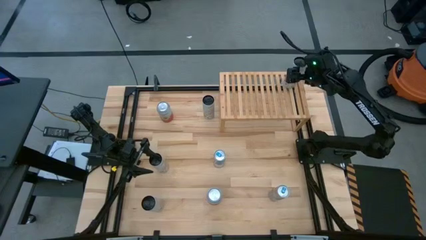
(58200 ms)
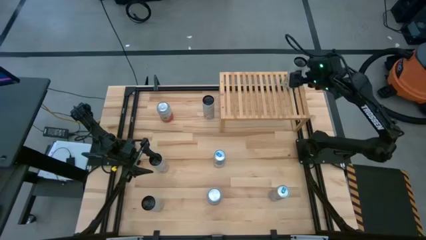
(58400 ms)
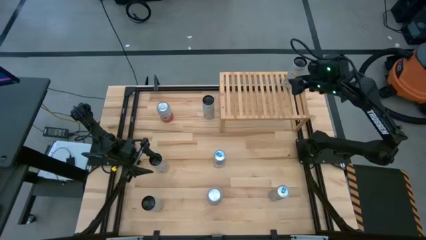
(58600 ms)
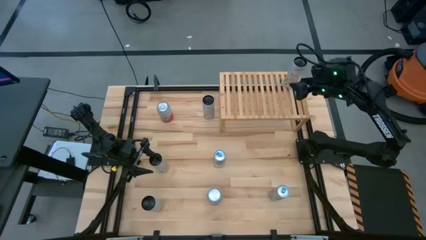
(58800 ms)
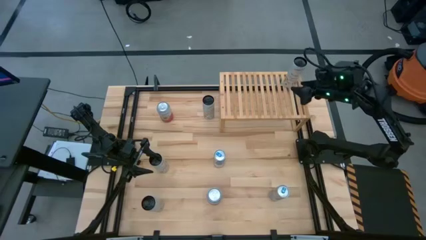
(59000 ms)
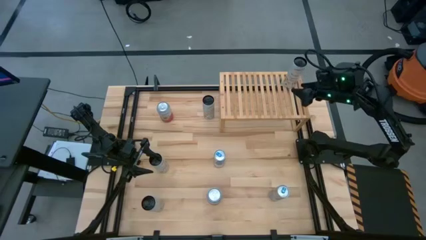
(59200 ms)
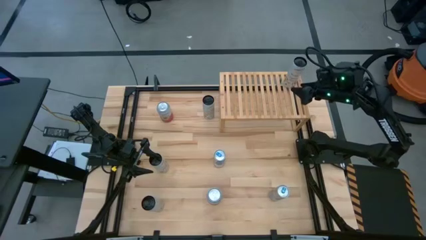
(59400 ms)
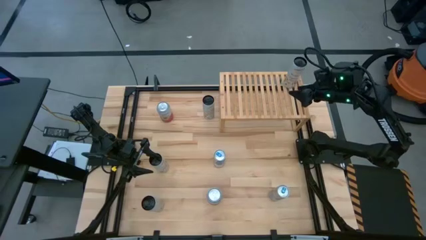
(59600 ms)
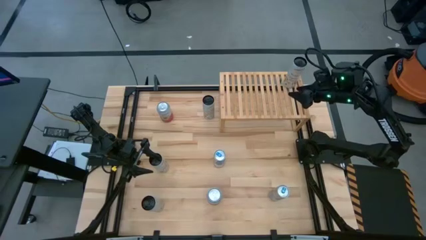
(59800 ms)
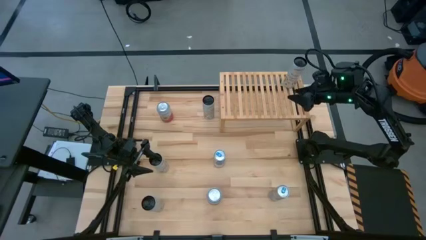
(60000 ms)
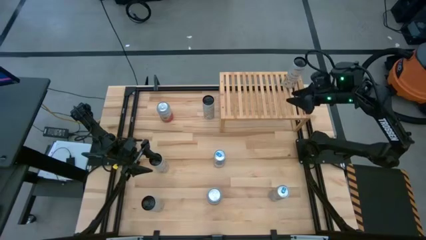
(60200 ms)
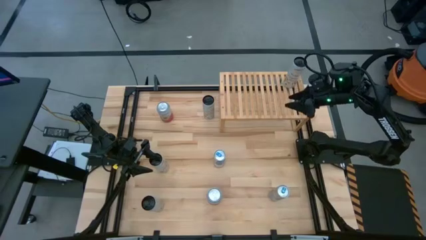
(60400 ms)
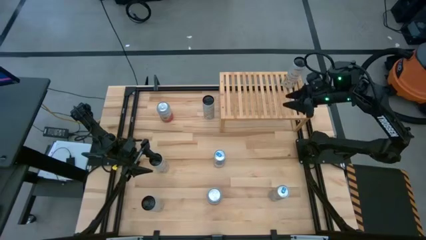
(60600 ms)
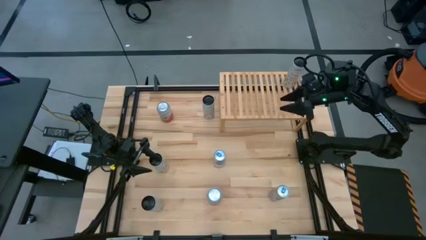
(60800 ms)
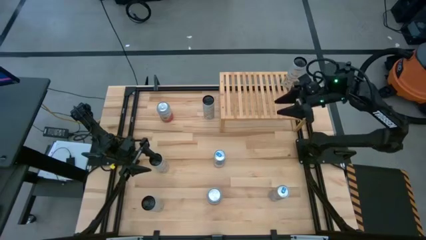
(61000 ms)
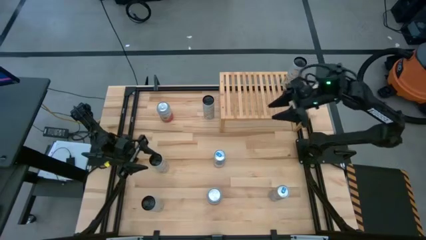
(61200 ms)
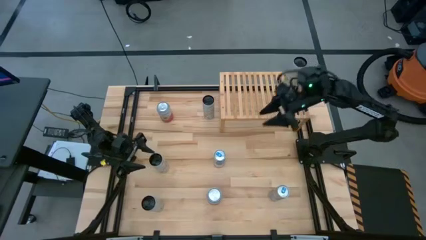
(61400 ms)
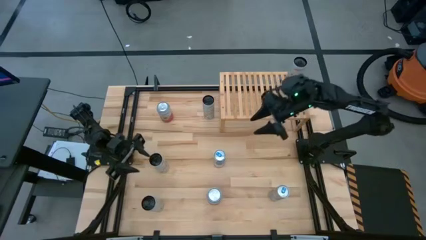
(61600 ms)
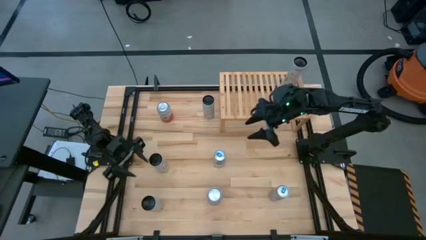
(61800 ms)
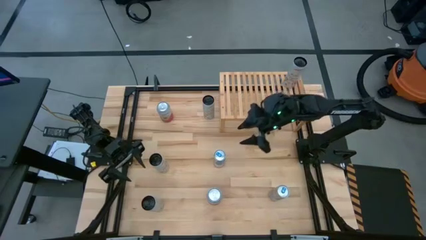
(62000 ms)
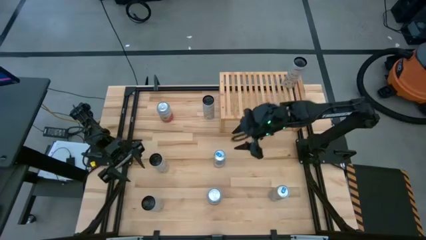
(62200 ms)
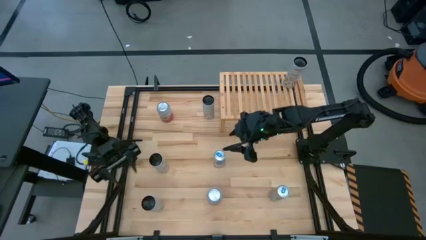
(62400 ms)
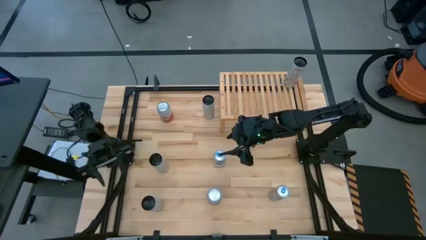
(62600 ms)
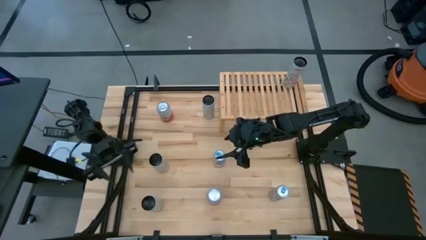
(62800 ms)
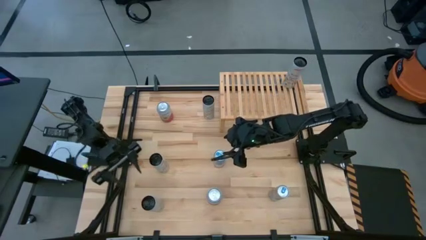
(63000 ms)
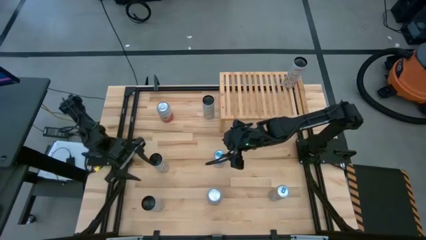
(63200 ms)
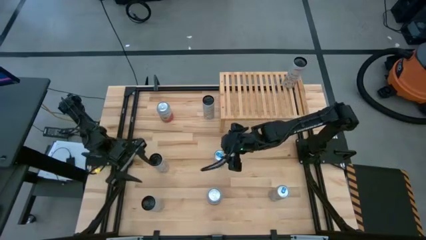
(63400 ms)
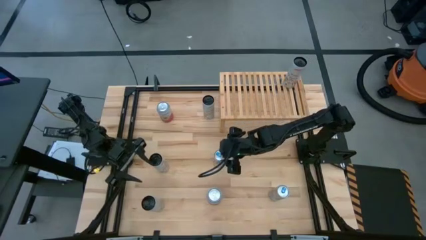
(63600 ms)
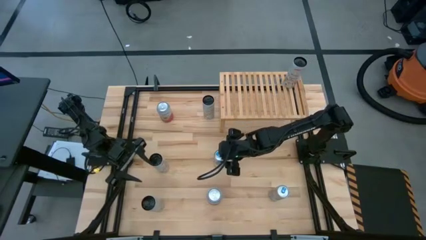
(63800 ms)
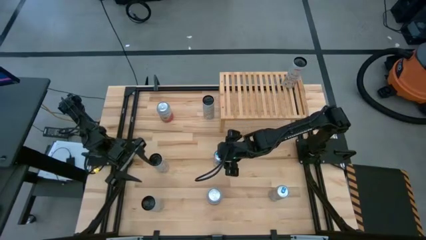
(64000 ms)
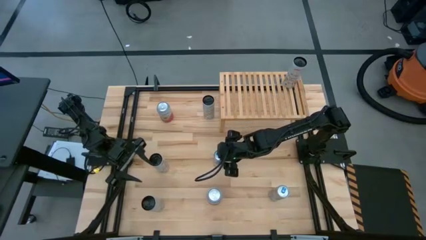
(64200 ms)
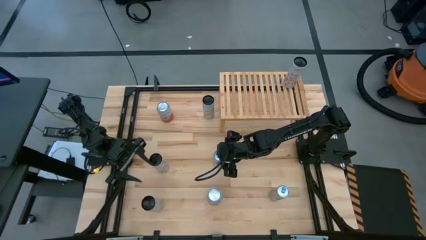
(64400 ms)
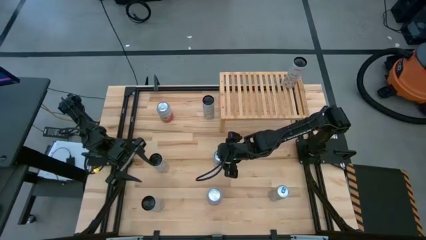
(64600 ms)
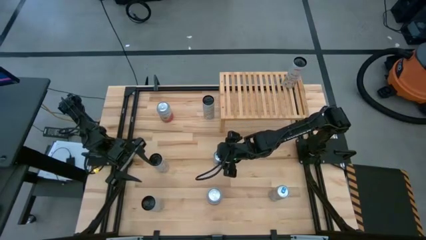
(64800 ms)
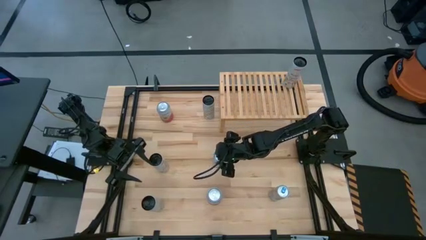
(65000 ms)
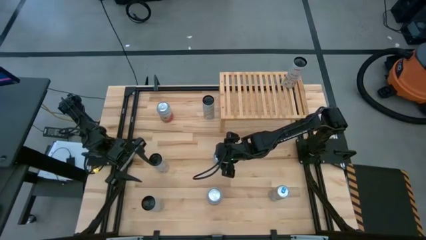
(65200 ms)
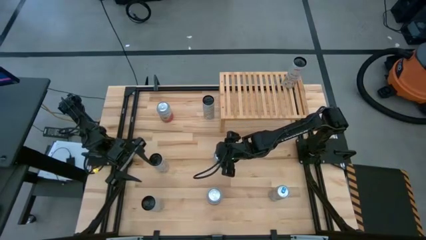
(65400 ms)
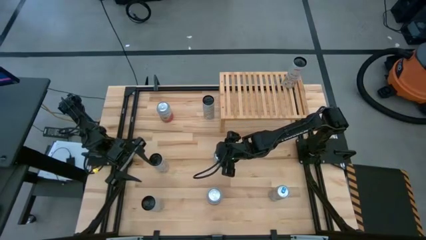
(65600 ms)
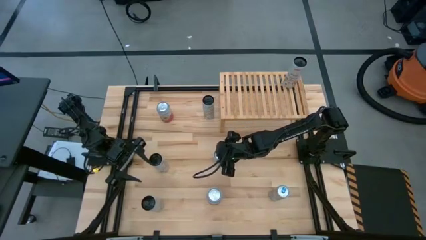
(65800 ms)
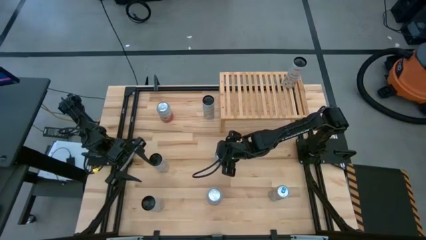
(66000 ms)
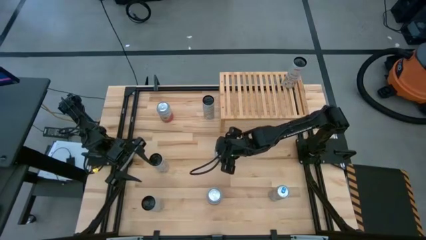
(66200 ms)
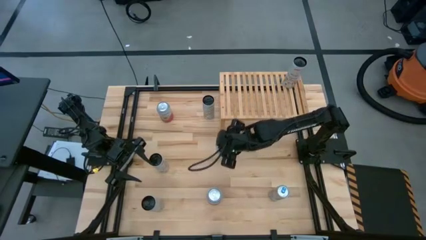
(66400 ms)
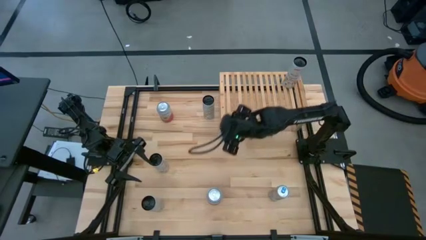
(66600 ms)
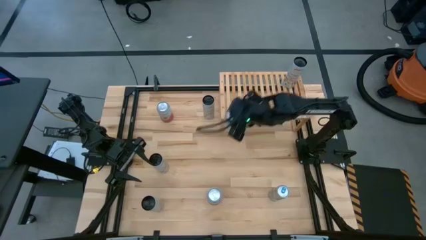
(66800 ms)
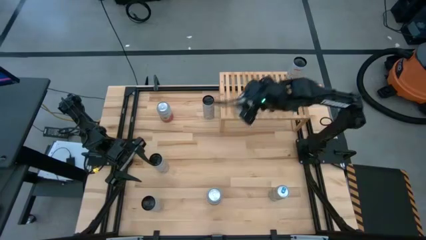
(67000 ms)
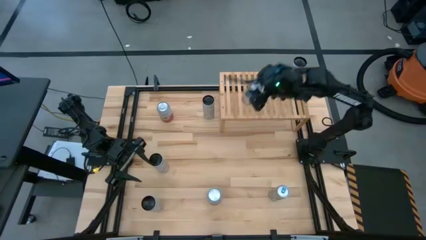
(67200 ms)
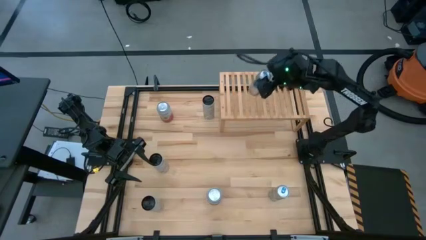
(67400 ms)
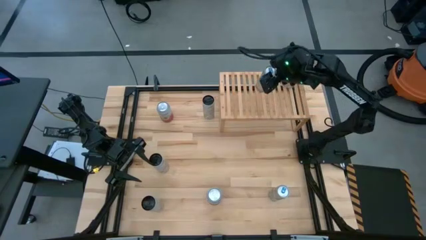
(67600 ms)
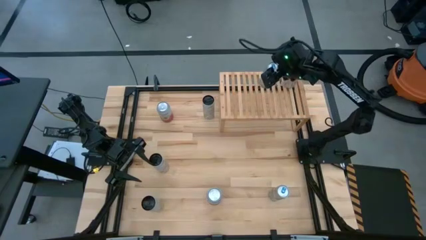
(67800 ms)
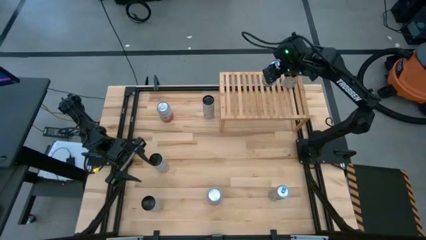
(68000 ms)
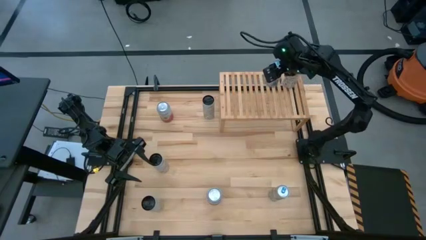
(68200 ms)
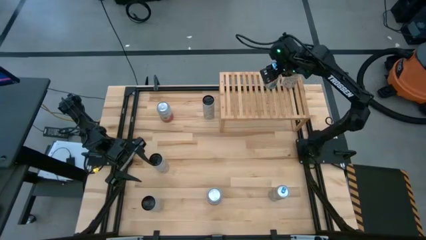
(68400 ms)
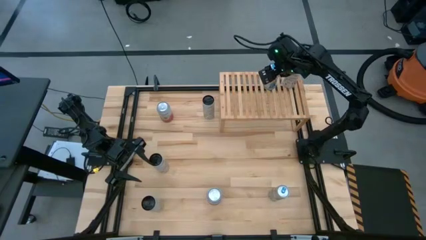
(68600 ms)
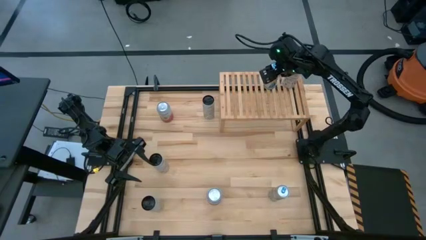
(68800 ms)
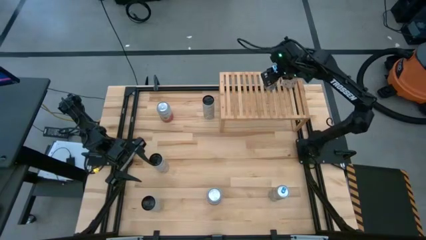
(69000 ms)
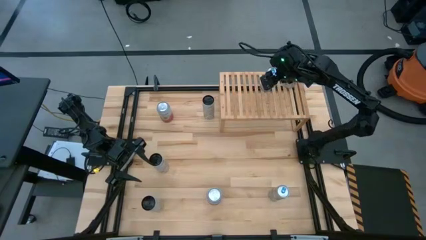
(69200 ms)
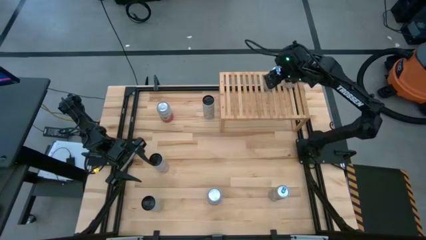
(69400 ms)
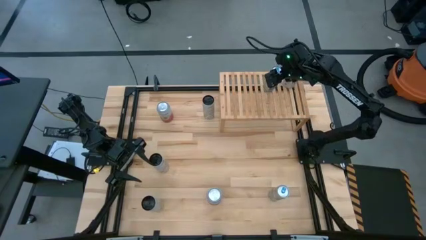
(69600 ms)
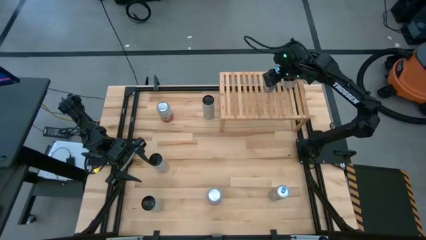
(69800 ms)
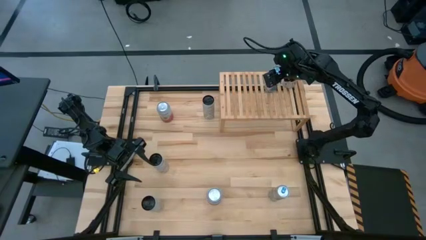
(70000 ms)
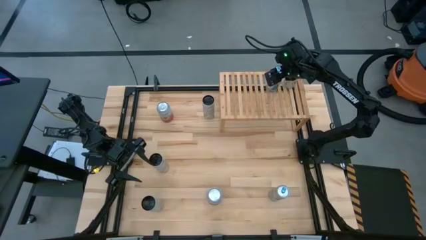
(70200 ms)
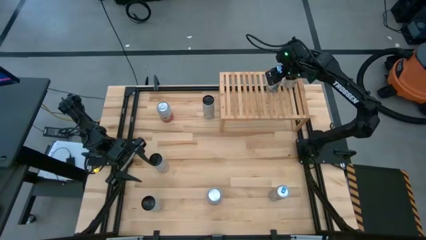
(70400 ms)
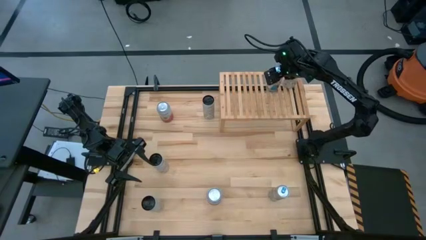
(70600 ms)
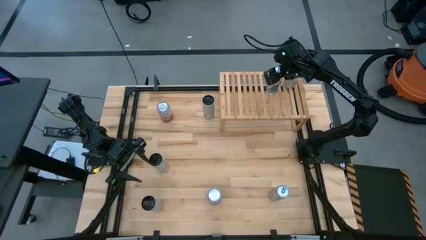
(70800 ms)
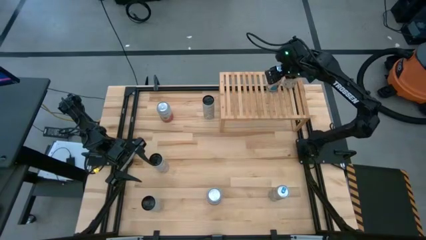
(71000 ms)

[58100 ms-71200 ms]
Task: Place canned beverage on shelf
Put the top blue soda can on the shelf
